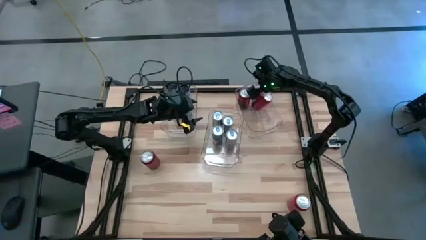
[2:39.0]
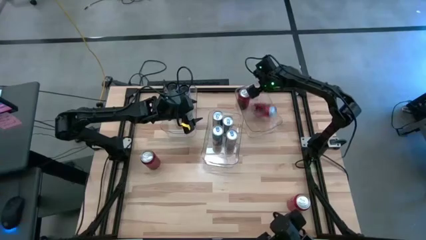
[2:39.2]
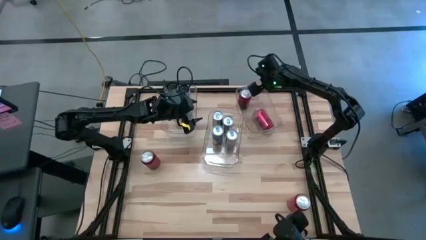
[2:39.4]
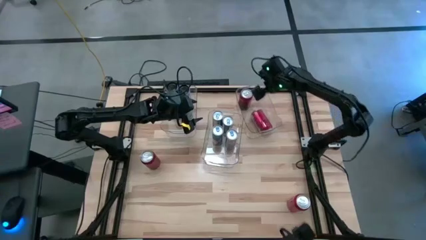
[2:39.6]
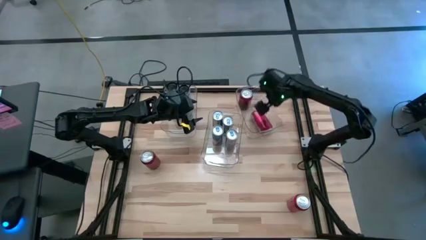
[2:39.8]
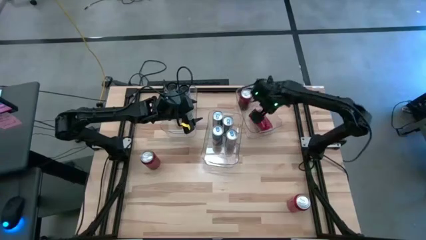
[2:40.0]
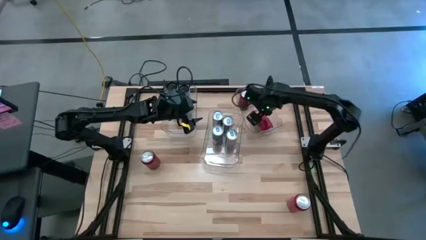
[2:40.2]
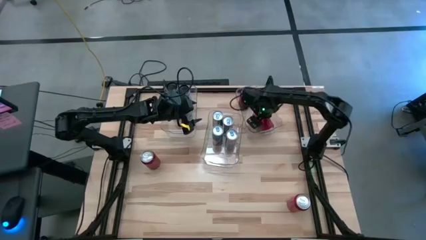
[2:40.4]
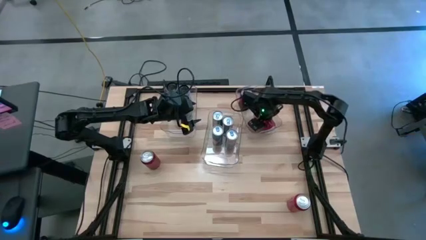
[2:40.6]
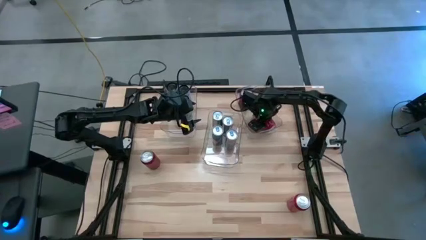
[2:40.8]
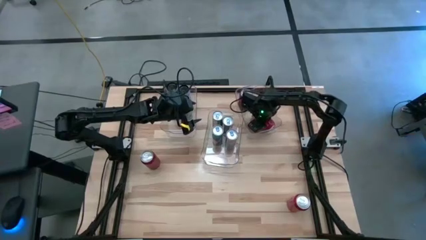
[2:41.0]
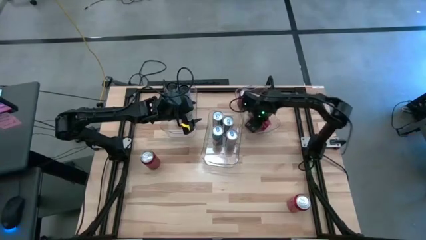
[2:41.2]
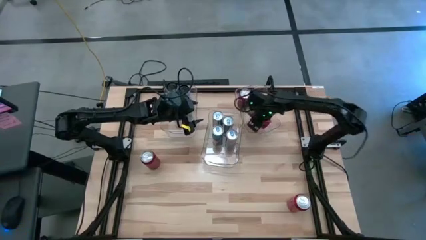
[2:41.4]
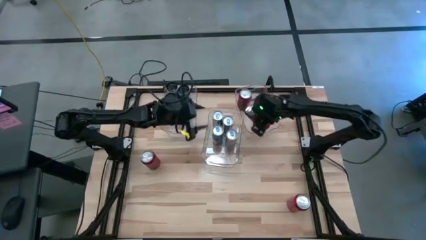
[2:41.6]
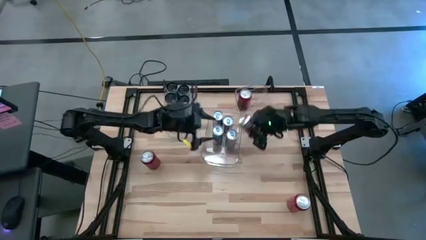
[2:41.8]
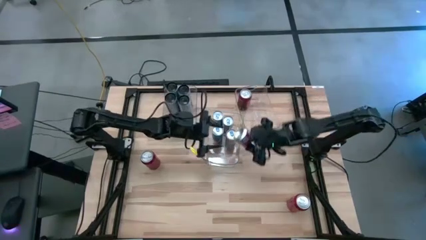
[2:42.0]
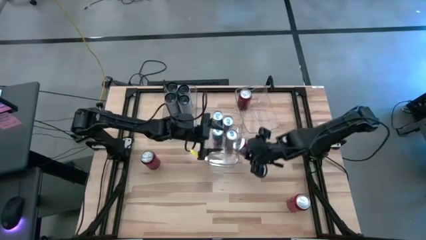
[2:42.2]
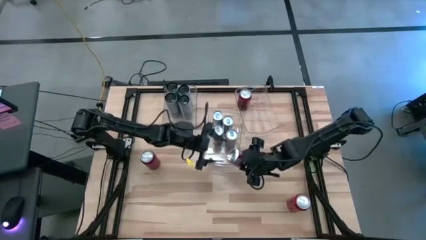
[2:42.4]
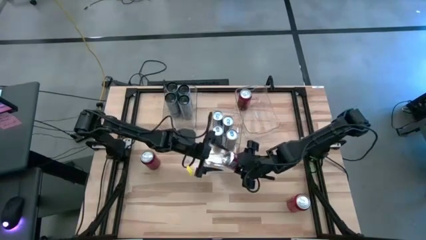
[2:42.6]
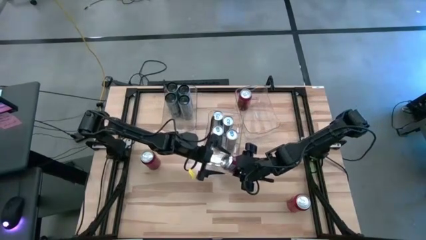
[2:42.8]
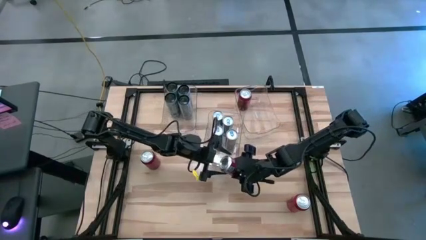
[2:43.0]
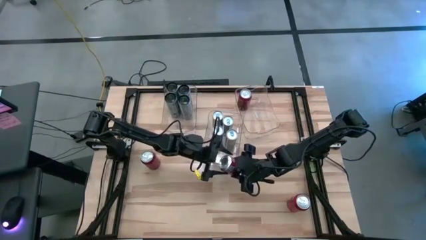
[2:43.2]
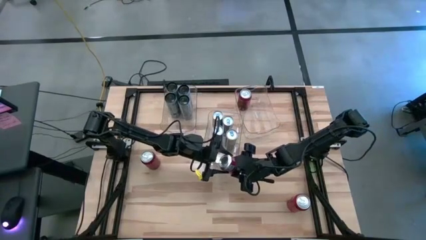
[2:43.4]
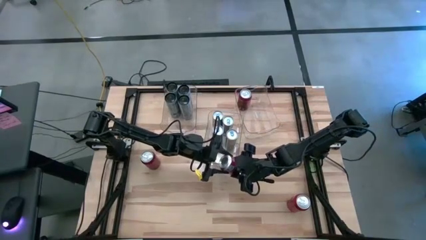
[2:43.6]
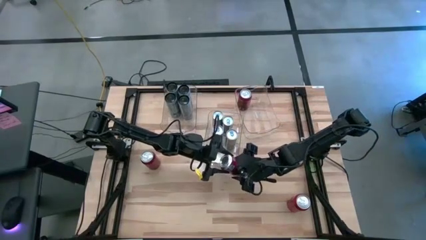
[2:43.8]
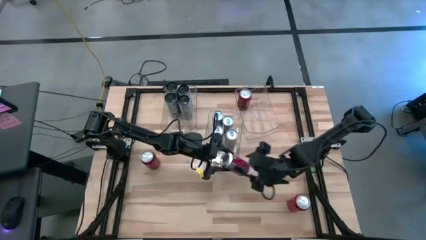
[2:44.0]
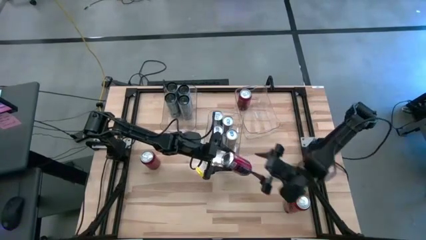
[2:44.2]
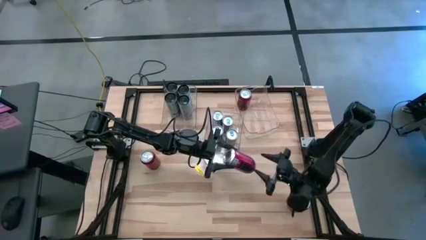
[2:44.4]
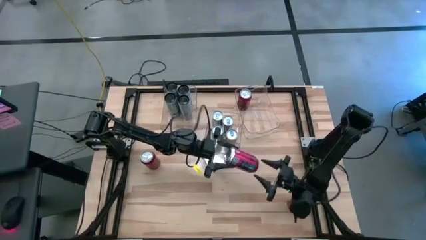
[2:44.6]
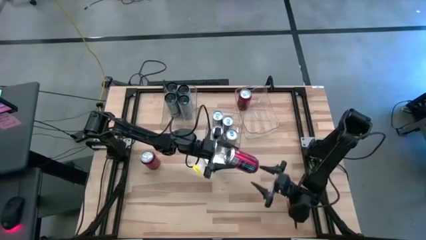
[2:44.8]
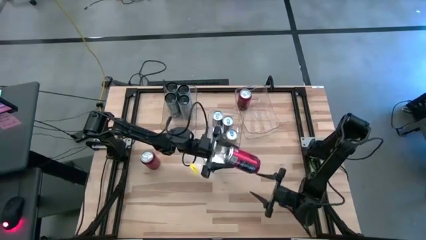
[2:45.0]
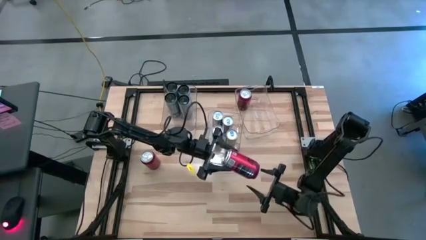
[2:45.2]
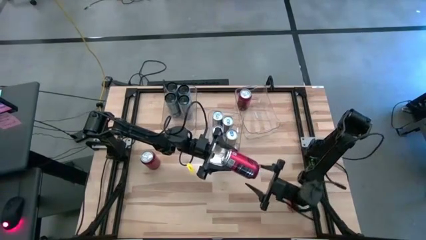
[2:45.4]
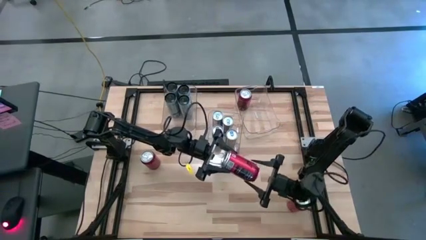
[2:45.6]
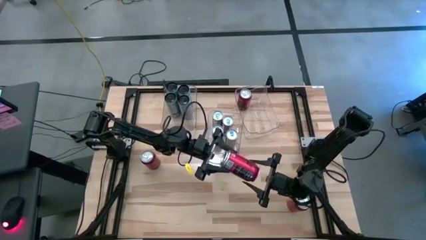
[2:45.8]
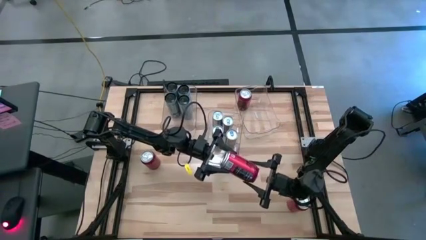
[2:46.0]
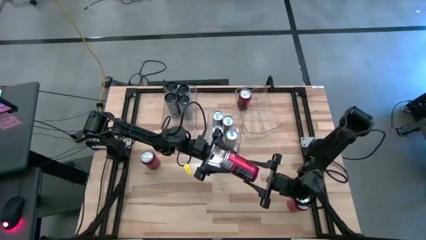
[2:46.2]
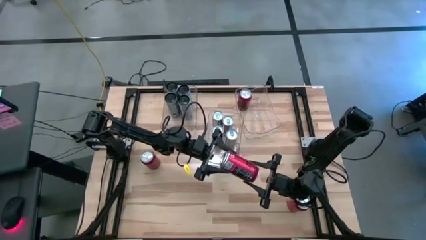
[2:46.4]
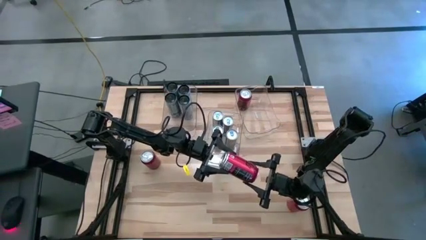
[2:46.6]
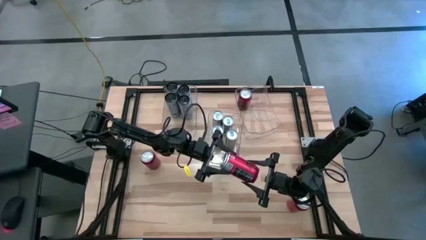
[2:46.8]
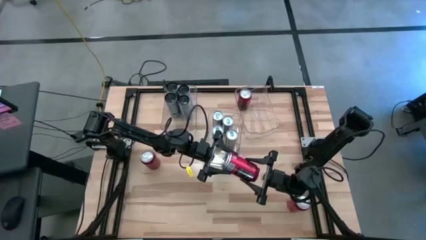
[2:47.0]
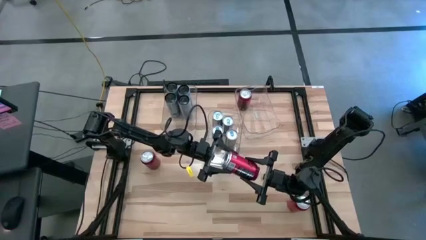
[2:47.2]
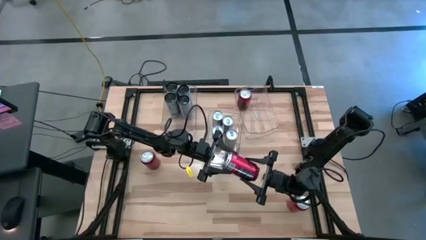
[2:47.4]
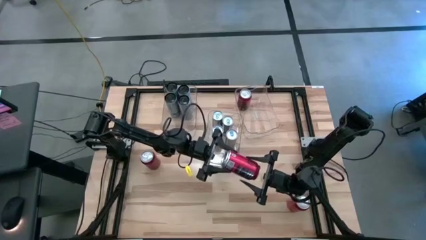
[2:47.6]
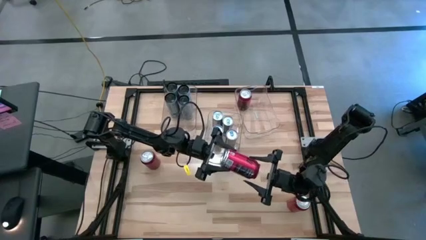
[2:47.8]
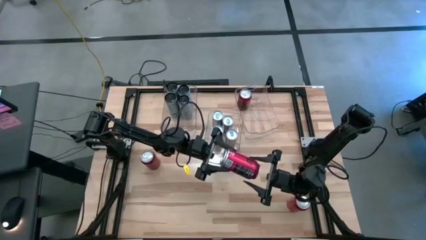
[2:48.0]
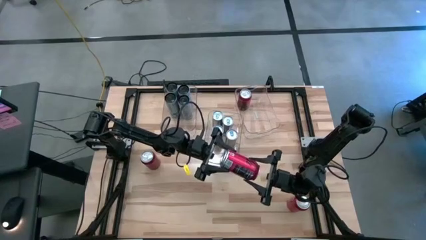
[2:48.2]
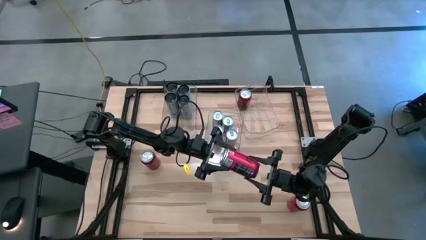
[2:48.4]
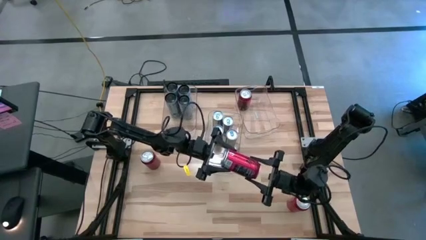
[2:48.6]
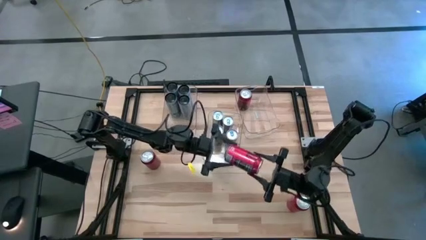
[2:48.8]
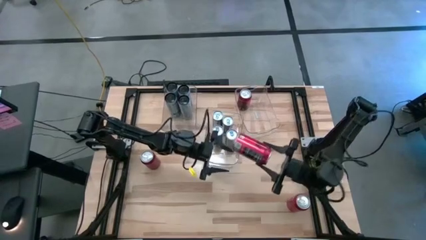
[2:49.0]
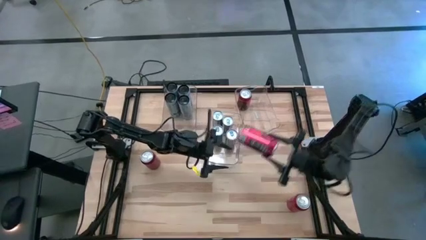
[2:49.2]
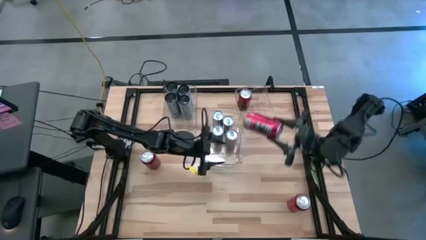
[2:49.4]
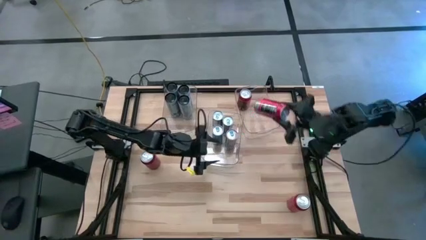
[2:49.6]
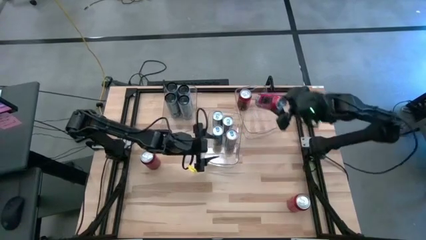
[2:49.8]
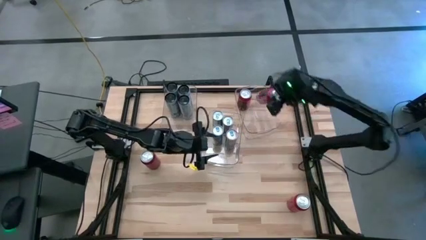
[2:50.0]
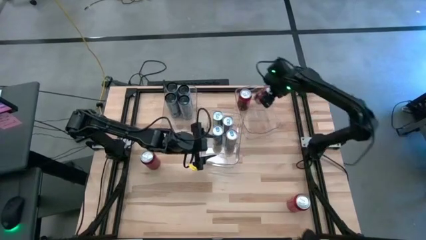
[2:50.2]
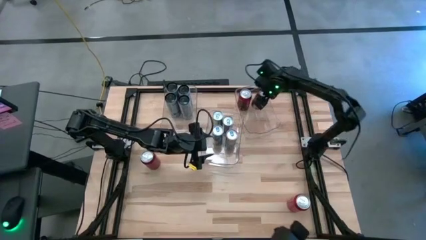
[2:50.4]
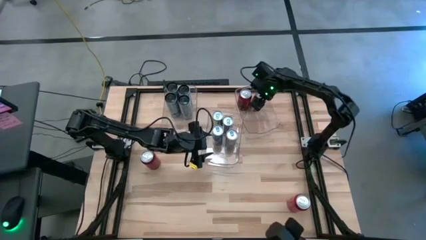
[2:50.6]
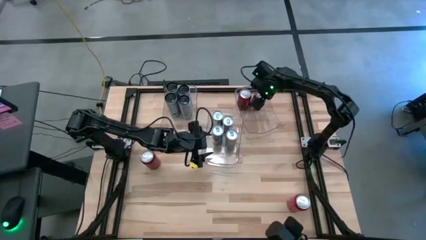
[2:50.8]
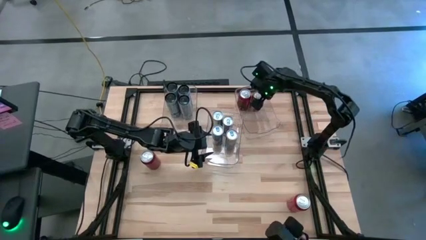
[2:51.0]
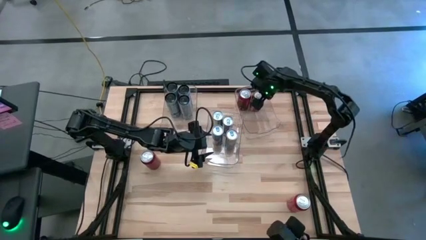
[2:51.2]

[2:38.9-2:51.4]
Task: Sort soda cans
Put the red-black soda can into the right transparent bin

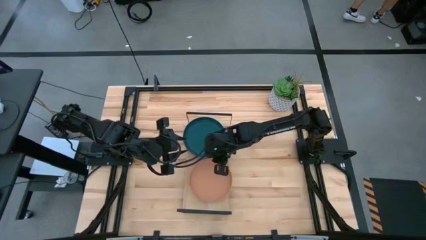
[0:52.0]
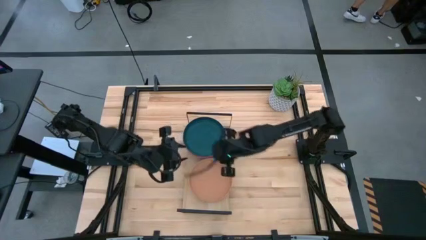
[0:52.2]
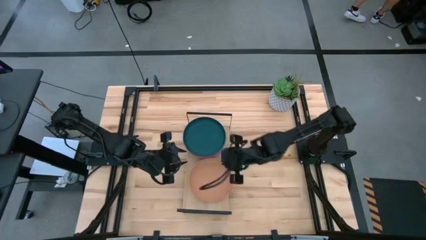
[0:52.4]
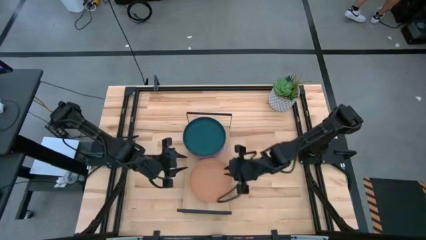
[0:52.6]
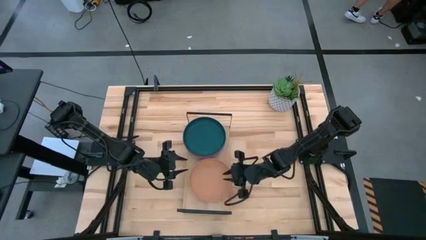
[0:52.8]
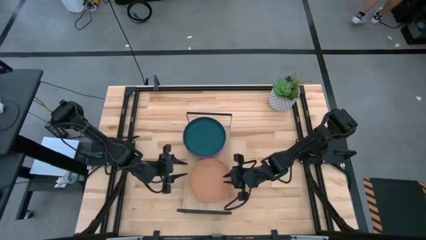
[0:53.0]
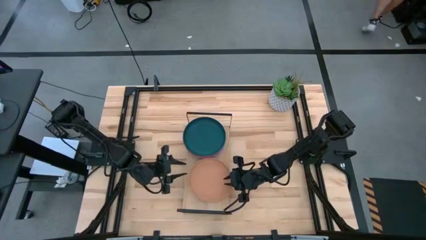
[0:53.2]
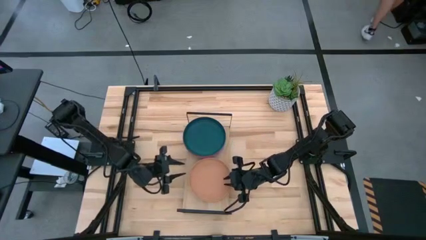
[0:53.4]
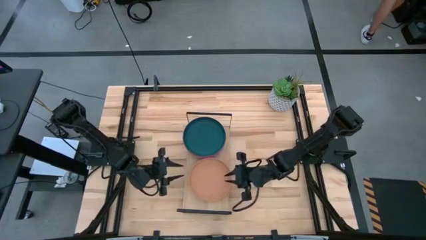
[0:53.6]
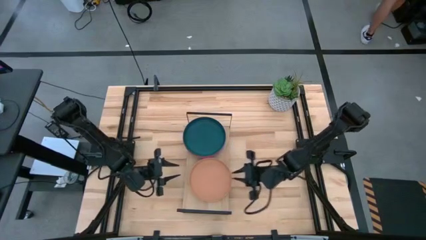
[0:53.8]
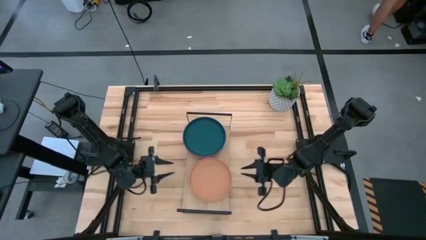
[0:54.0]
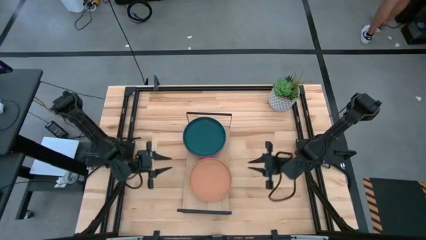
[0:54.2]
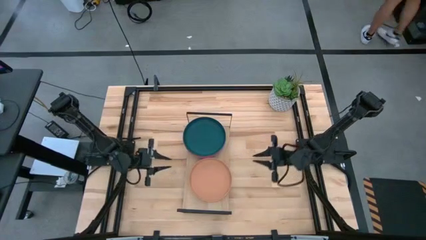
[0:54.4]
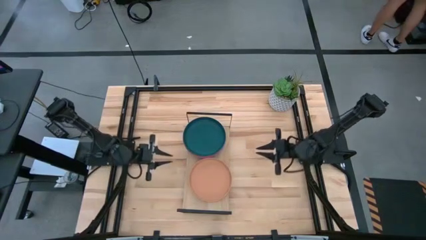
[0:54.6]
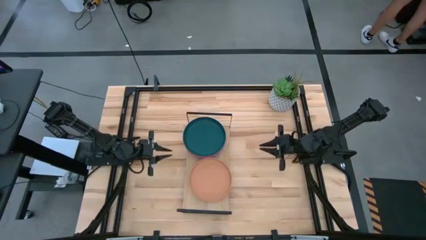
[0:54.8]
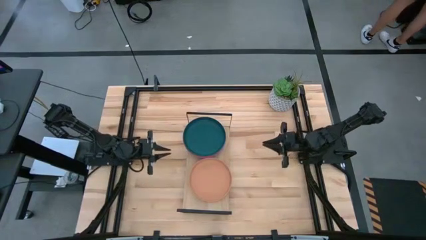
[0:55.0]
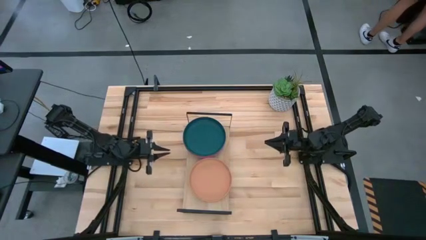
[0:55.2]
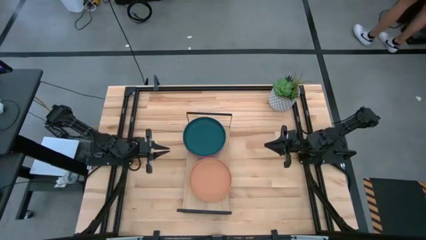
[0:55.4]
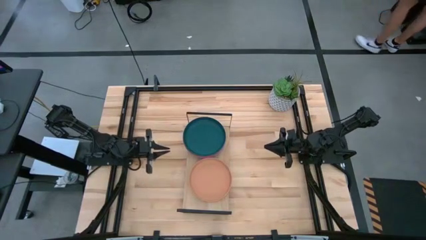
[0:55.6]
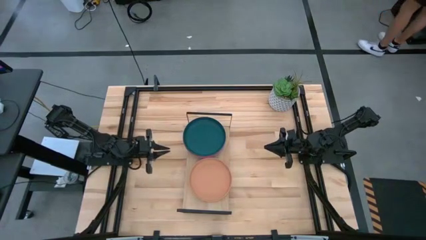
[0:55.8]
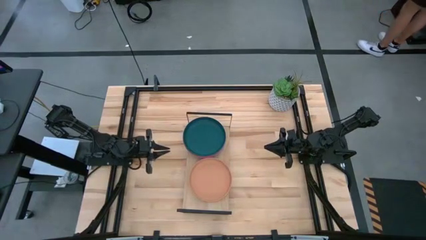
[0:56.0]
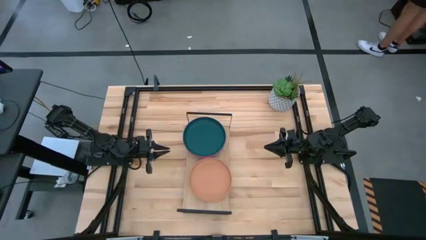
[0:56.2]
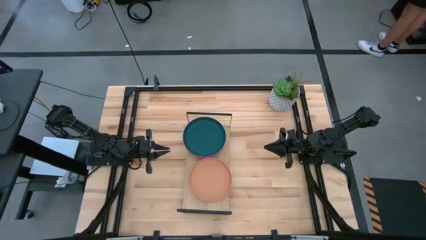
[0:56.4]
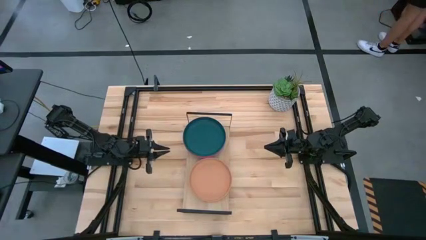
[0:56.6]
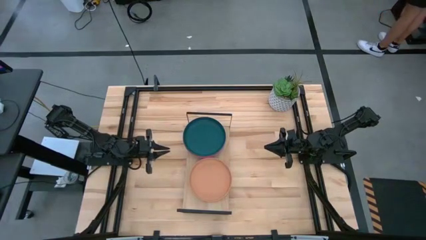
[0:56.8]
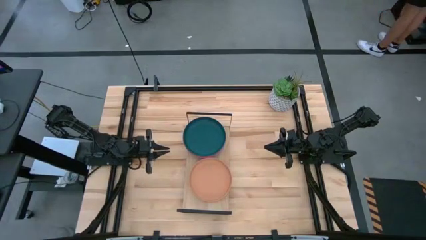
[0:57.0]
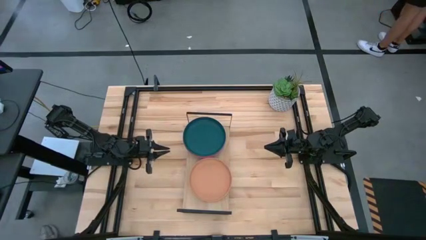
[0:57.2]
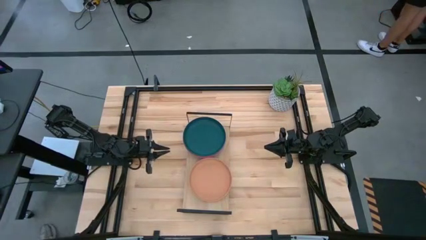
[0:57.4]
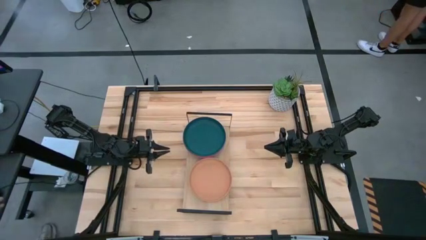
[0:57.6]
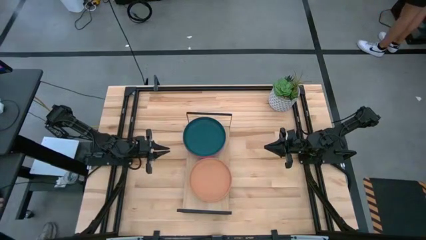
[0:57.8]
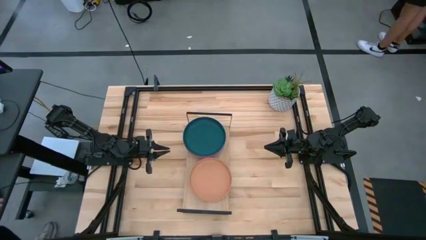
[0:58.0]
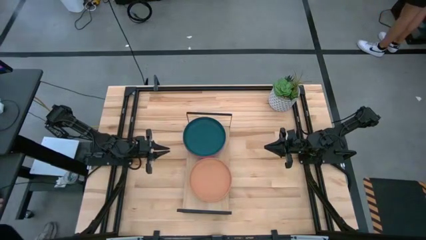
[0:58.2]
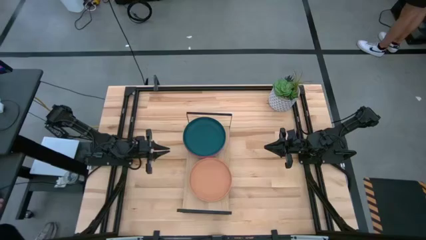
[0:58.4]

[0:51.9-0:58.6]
Task: Place and stack plates onto a shelf
Return to Home Position
